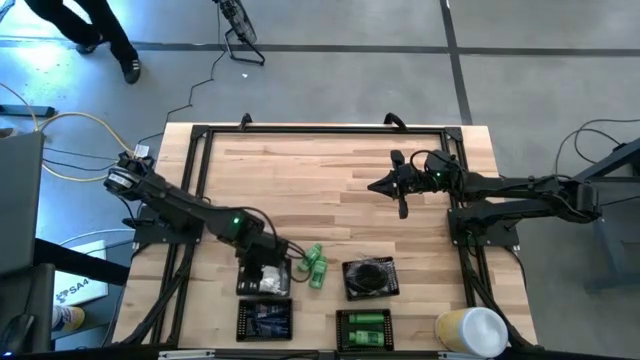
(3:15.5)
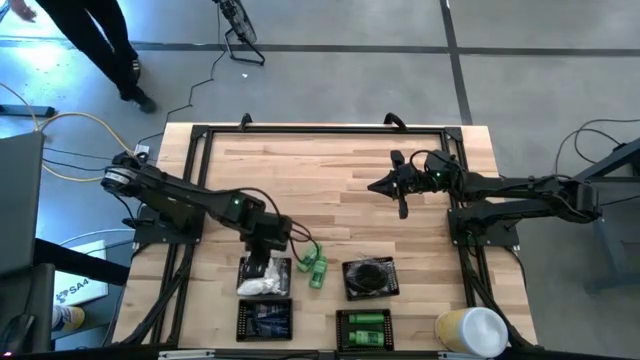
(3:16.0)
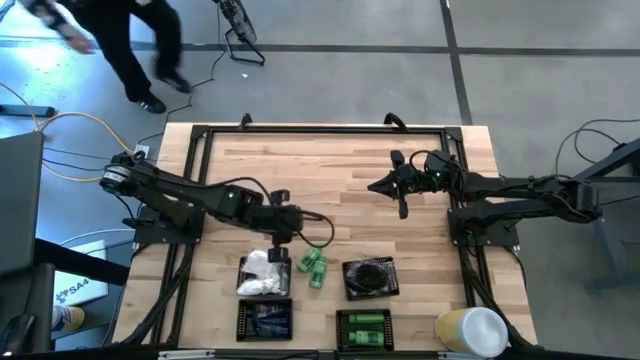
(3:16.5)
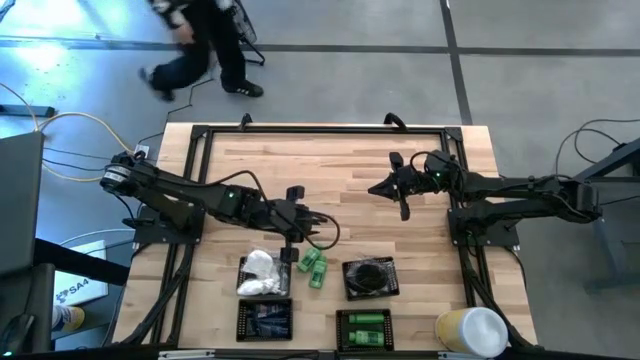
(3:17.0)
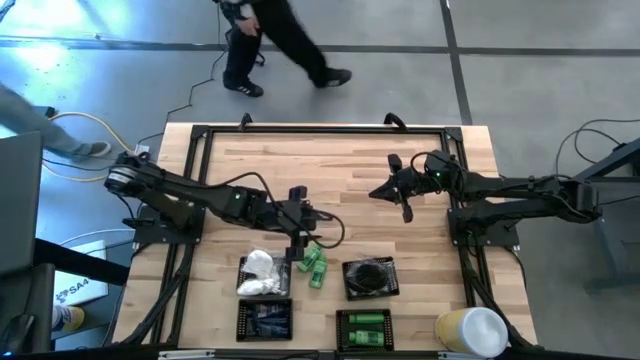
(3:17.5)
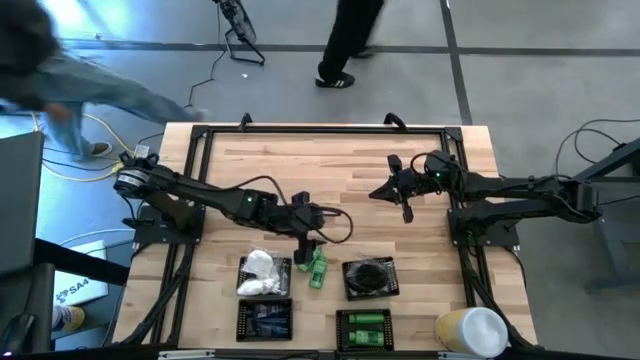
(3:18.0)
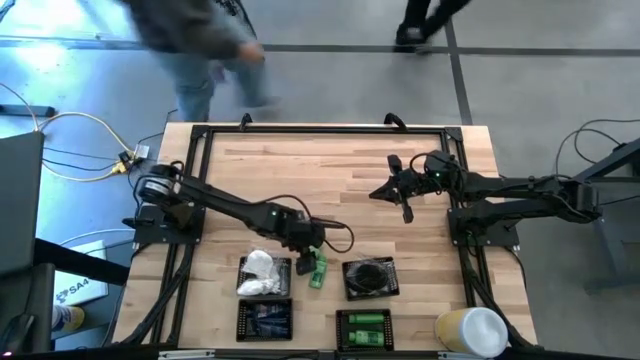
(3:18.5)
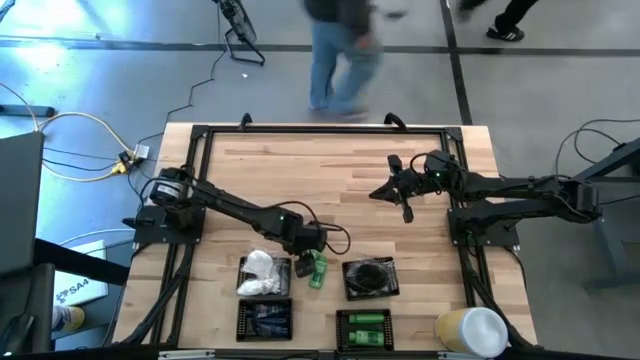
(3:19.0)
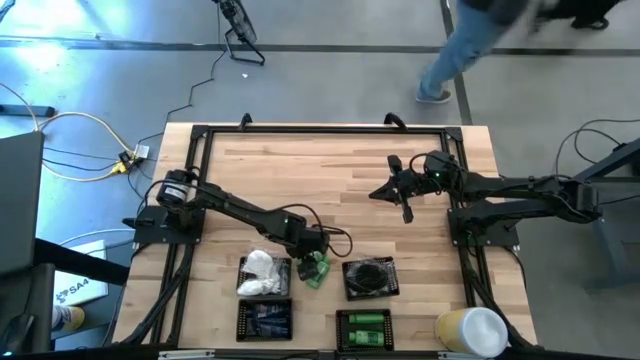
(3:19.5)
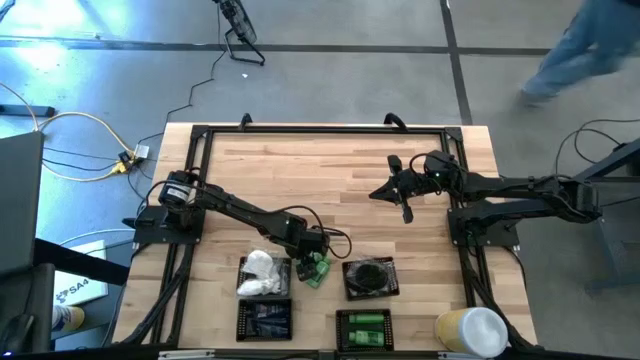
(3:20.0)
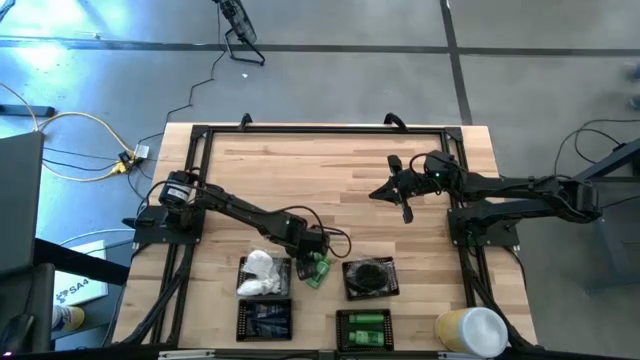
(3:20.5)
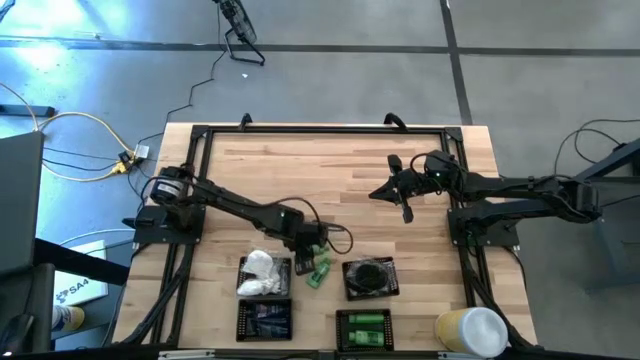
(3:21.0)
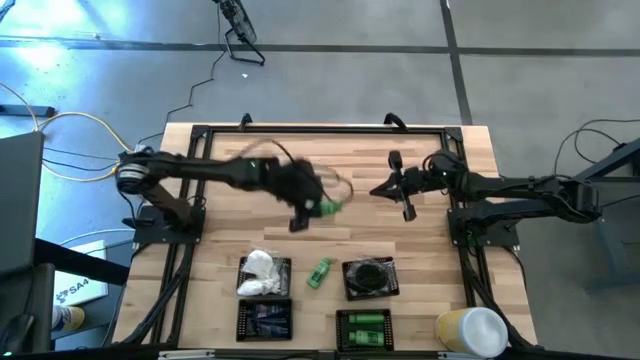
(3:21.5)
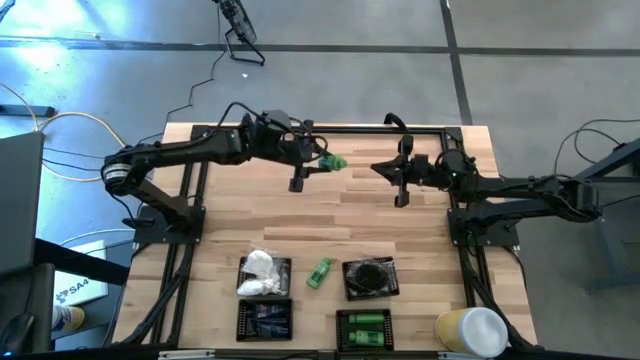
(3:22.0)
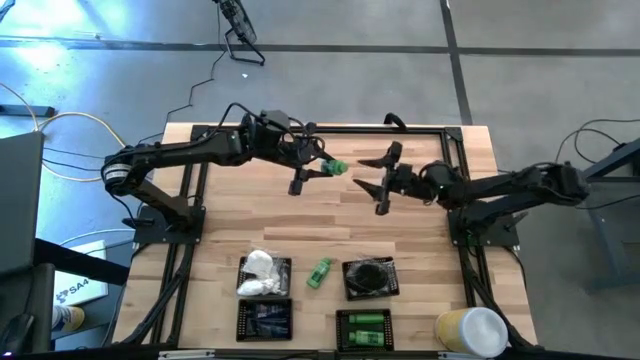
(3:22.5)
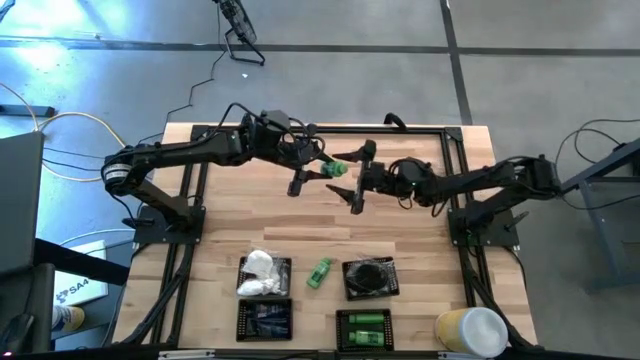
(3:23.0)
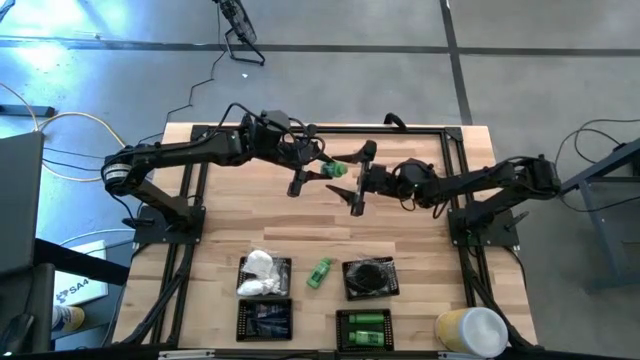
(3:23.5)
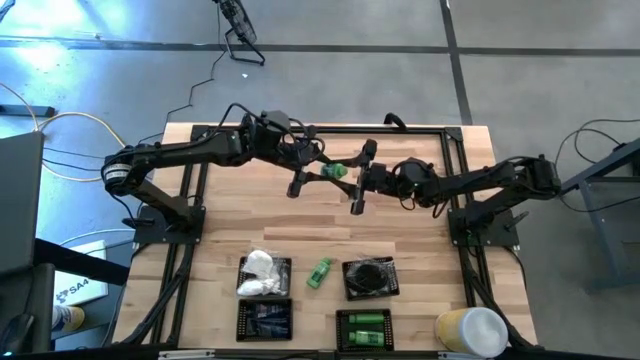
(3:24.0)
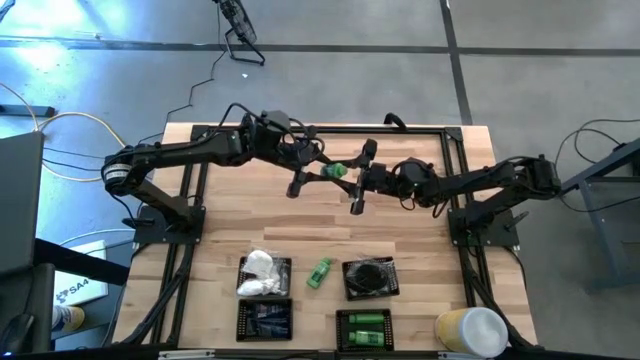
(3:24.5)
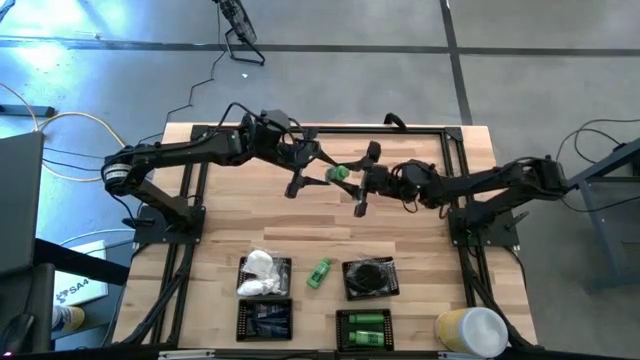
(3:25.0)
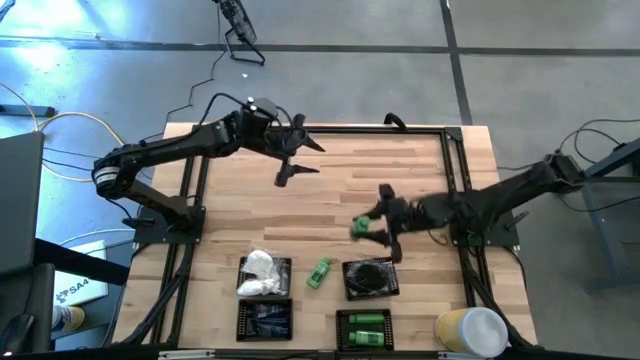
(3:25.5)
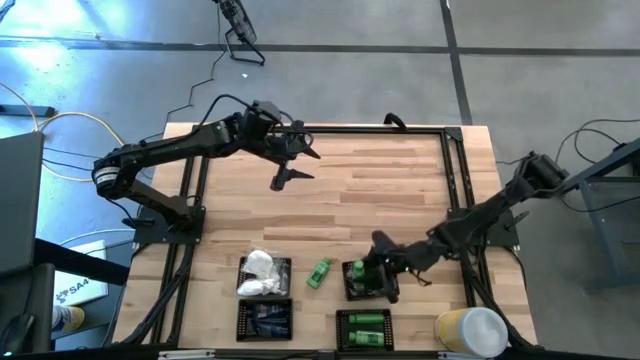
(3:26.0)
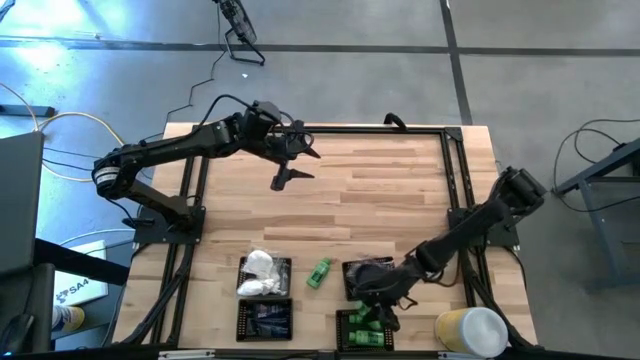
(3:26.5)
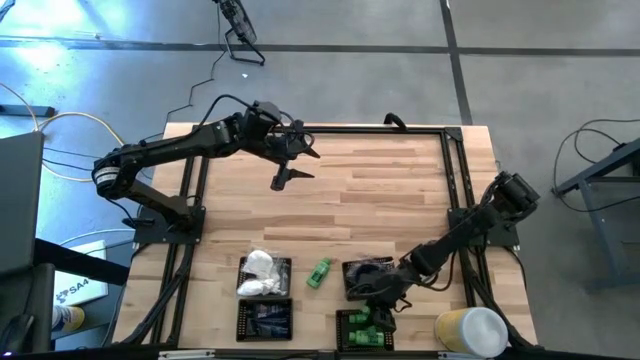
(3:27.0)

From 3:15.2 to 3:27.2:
Task: Pick & Place Travel size toiletries
Put the green shampoo bottle into the bottom right black bin

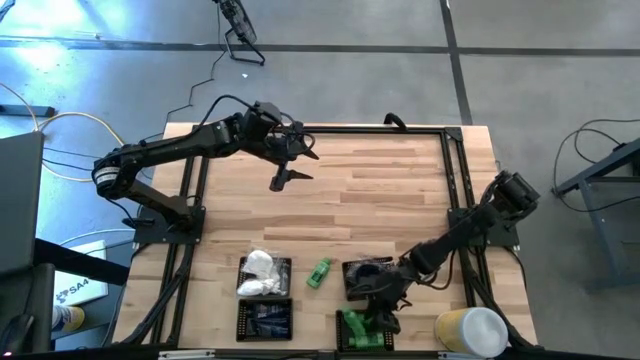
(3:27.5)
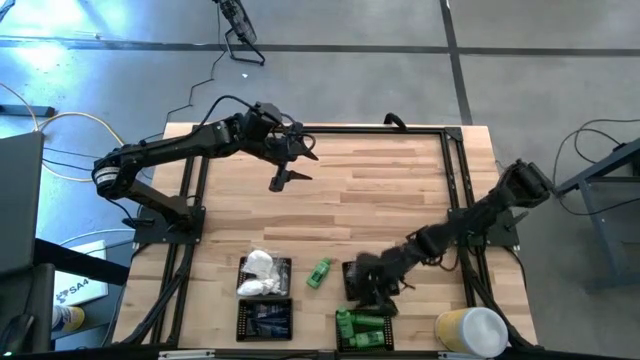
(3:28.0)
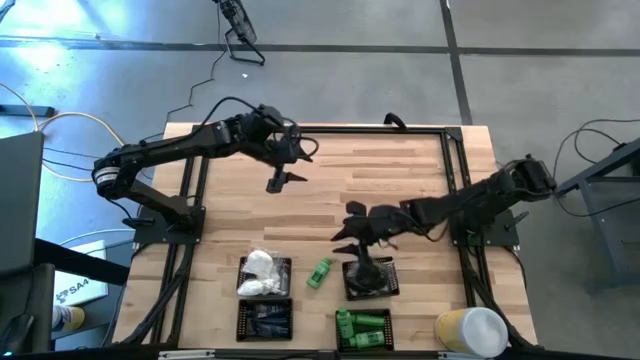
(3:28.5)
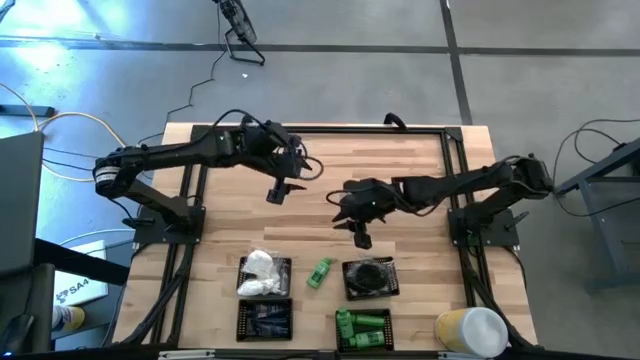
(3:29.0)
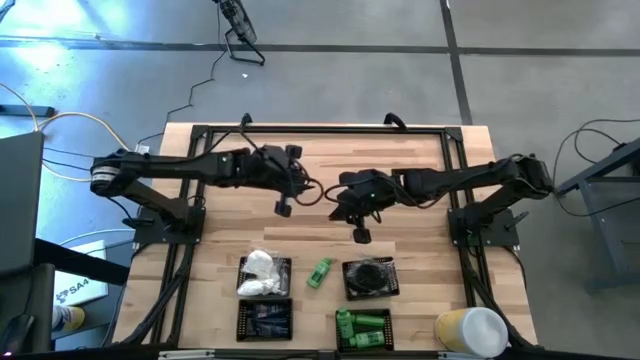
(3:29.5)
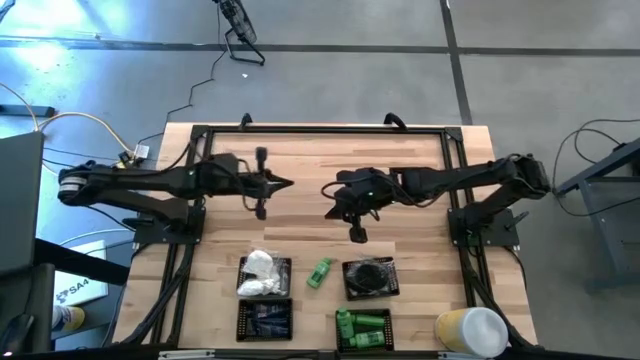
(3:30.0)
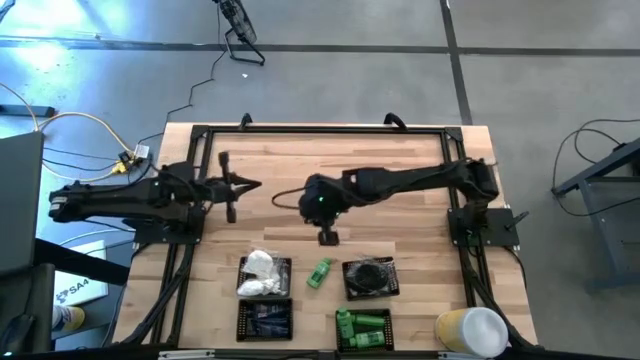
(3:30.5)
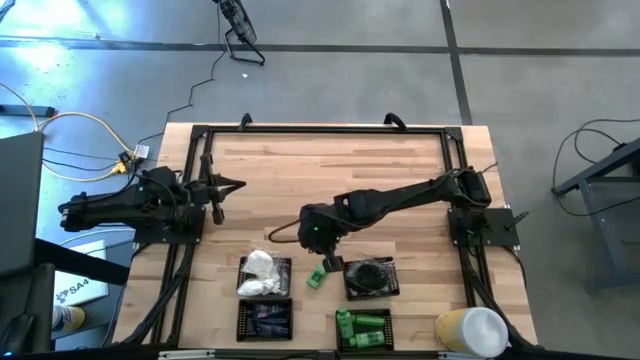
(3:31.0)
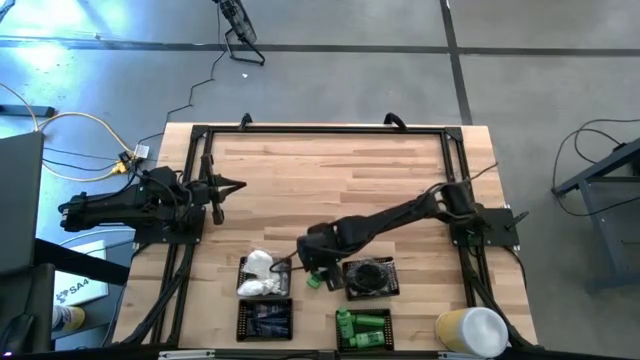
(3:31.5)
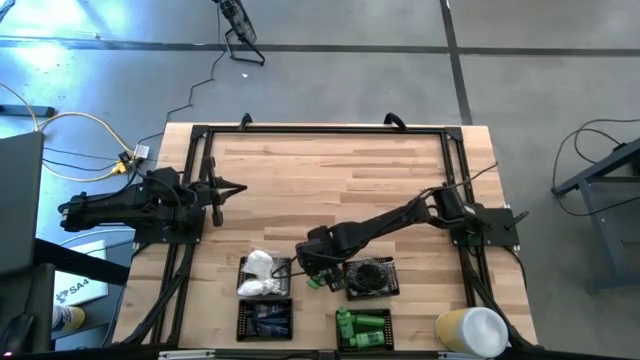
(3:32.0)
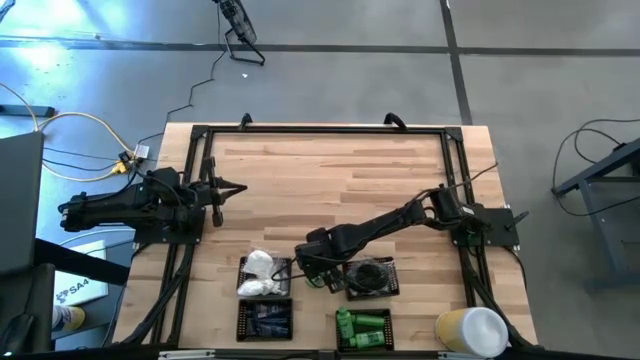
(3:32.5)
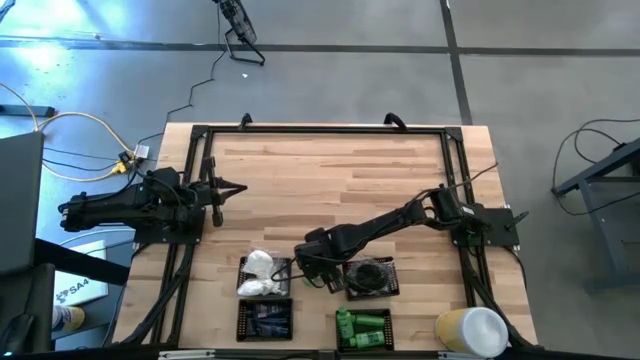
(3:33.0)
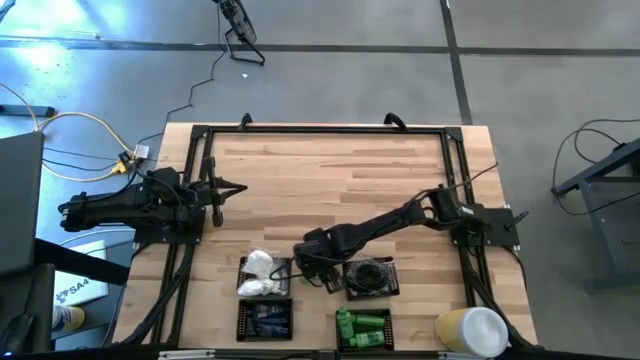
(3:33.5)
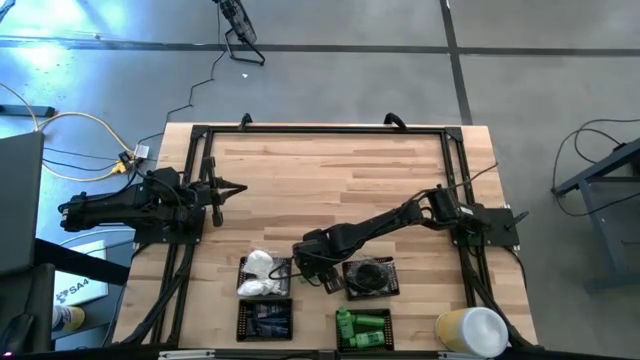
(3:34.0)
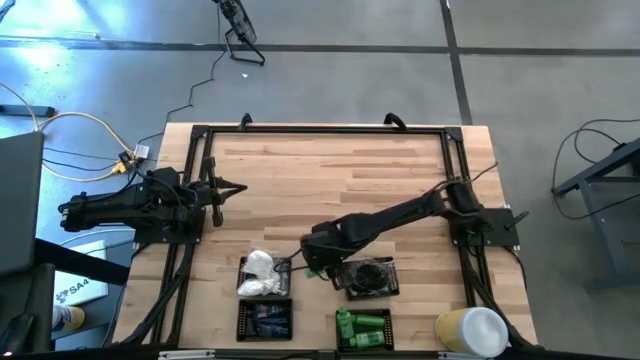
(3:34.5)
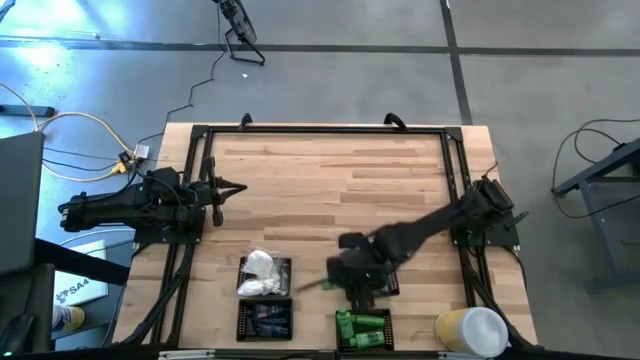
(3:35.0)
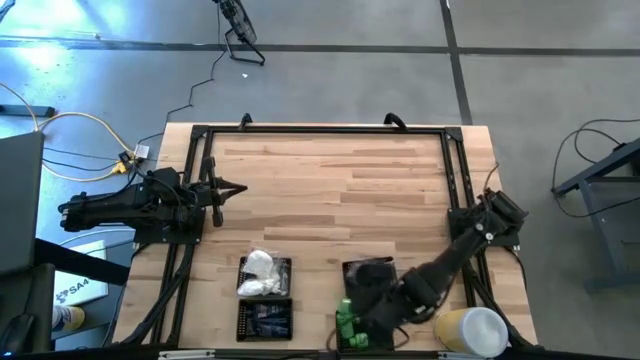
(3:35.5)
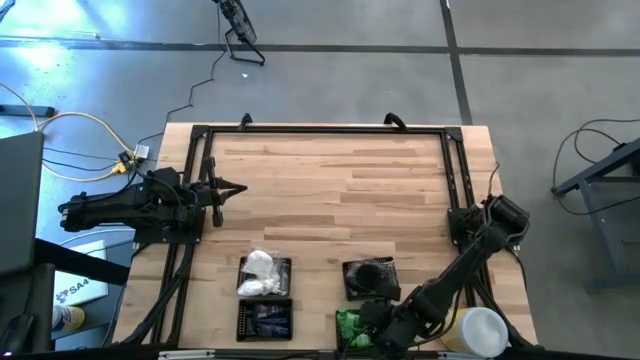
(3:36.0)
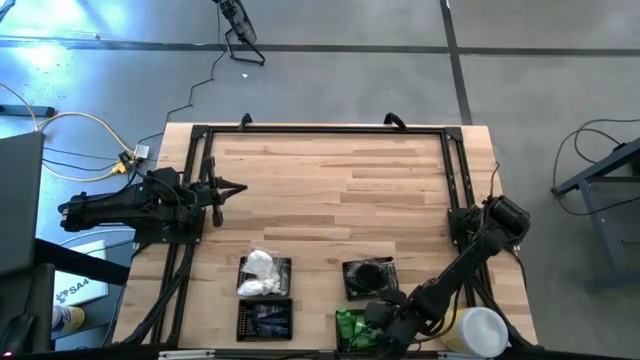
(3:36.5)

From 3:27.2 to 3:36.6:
Put the green shampoo bottle into the bottom right black bin
